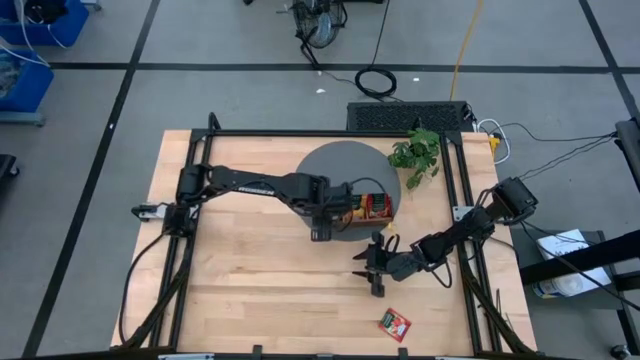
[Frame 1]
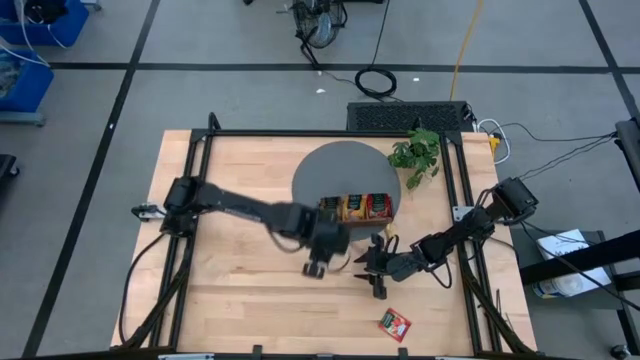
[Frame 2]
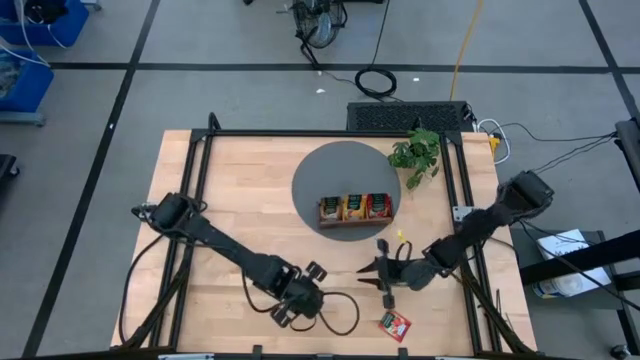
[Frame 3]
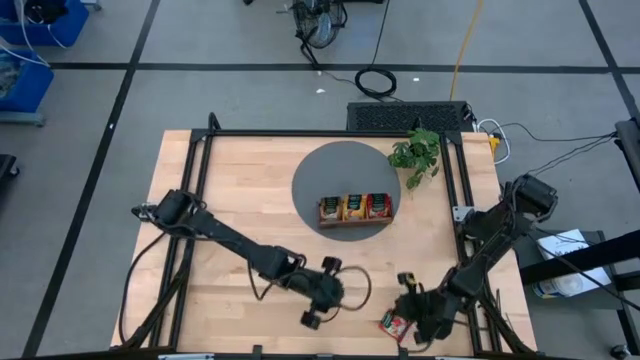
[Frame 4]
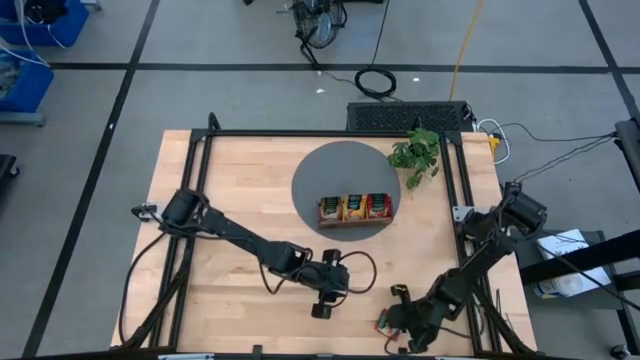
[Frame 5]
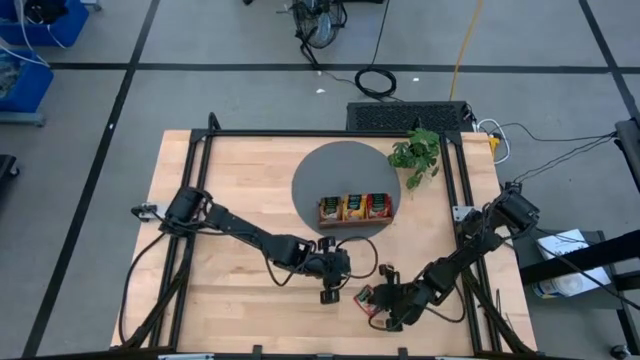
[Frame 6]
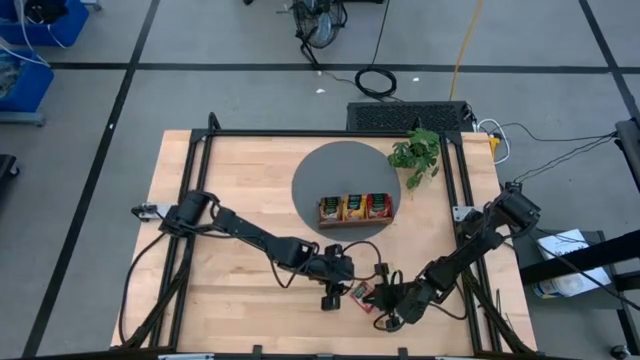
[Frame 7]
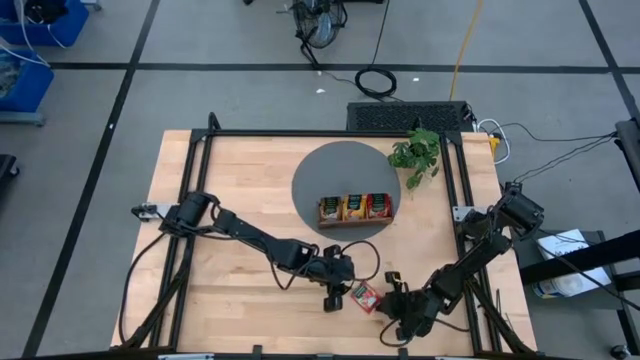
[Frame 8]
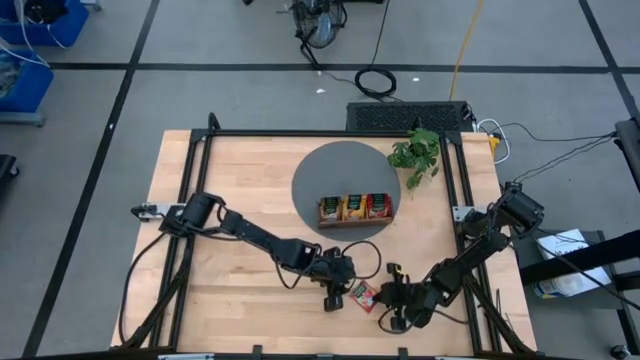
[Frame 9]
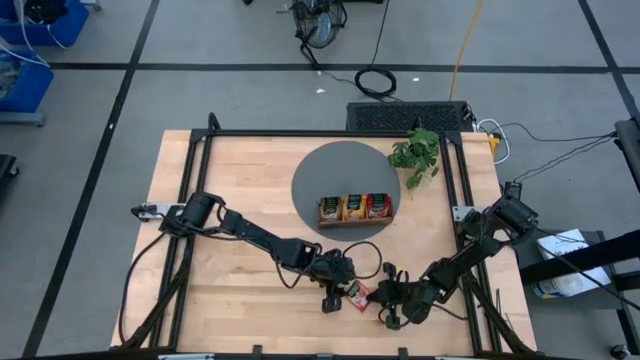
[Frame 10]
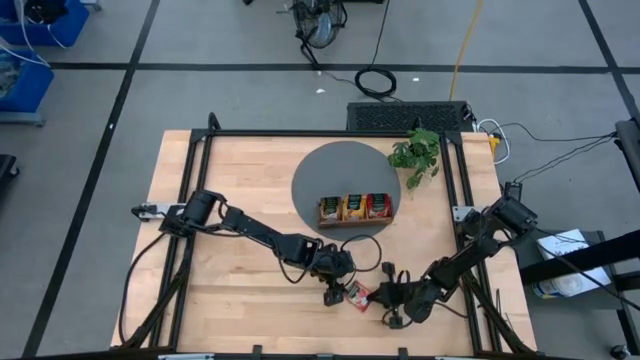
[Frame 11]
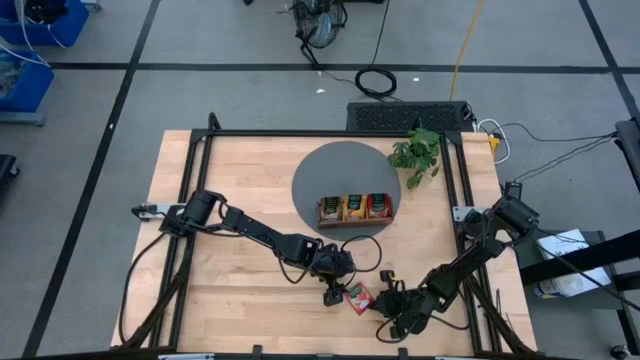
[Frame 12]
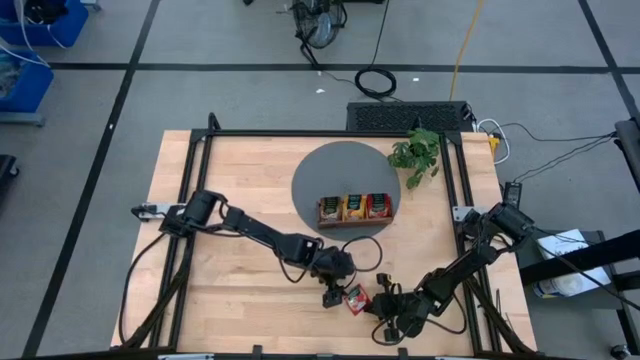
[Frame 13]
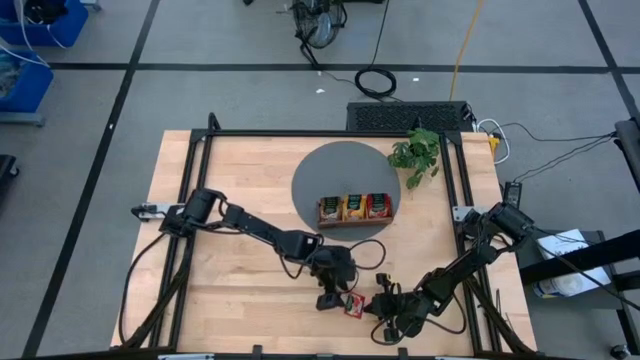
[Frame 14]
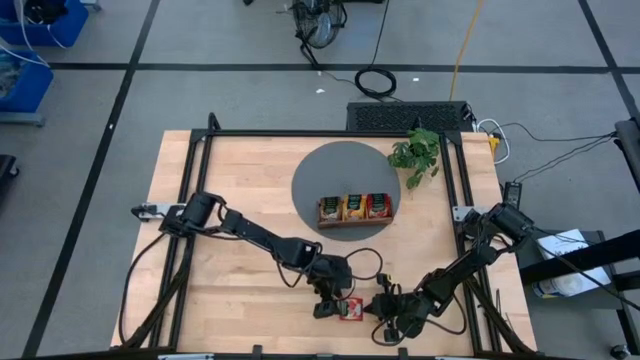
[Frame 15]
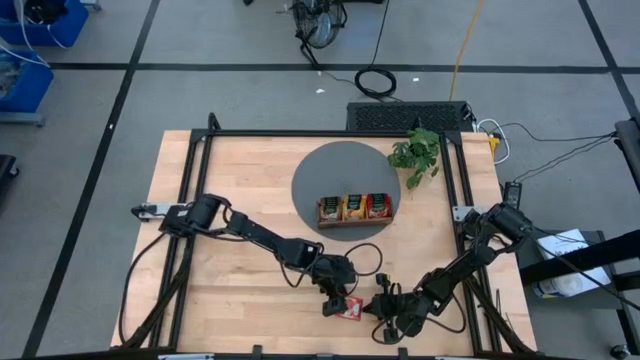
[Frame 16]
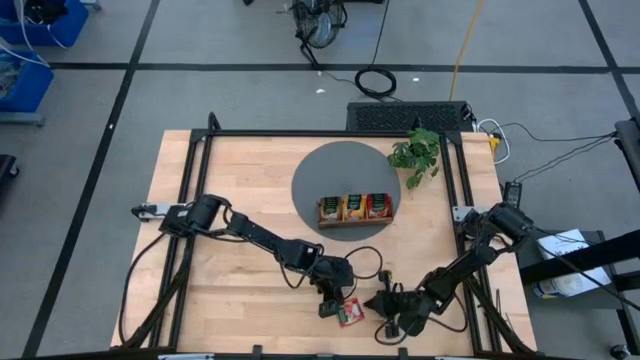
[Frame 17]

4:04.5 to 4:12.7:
Task: Pick & Place Tea
Put the red tea bag into the right section of the wooden organizer

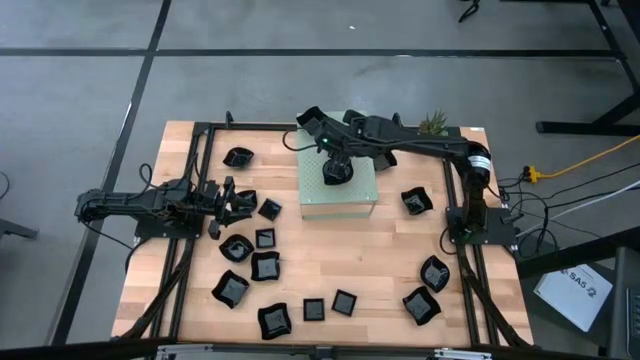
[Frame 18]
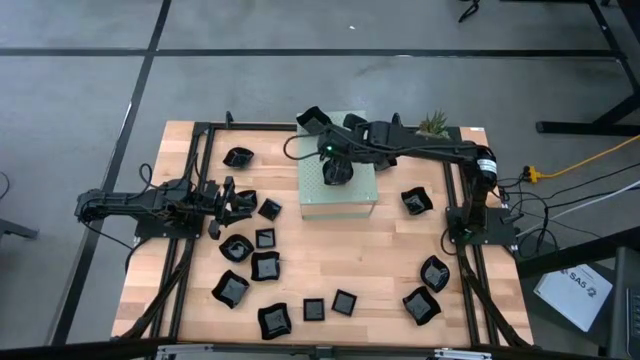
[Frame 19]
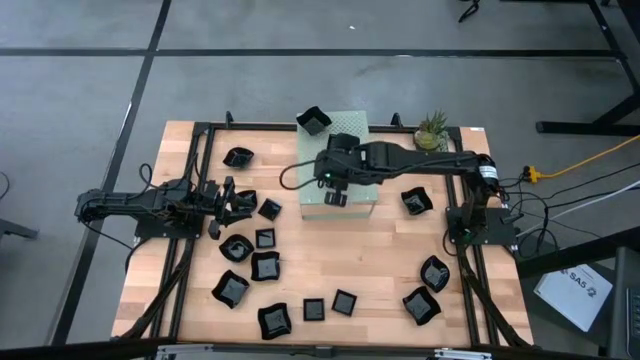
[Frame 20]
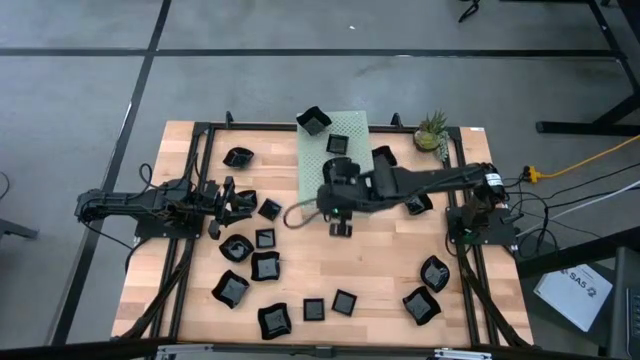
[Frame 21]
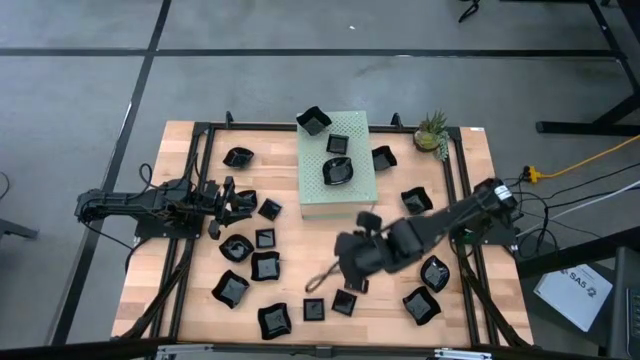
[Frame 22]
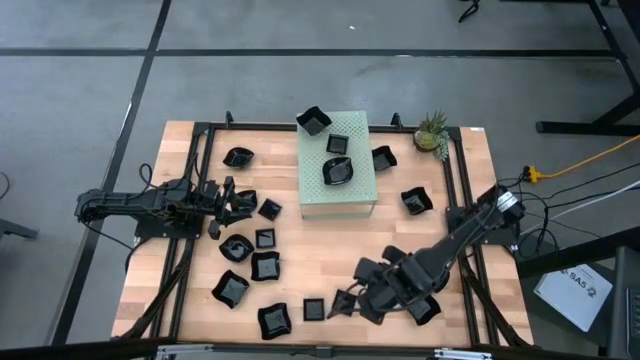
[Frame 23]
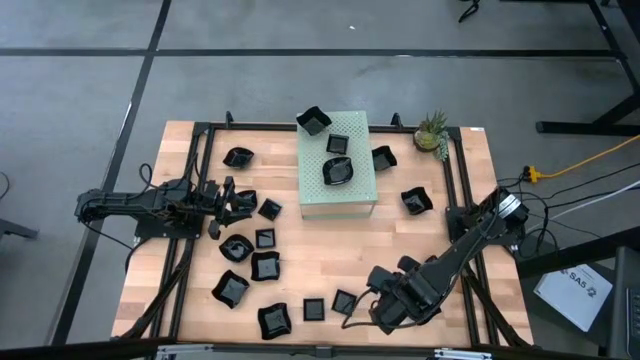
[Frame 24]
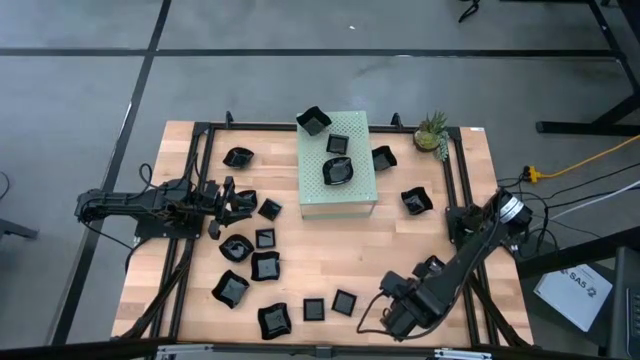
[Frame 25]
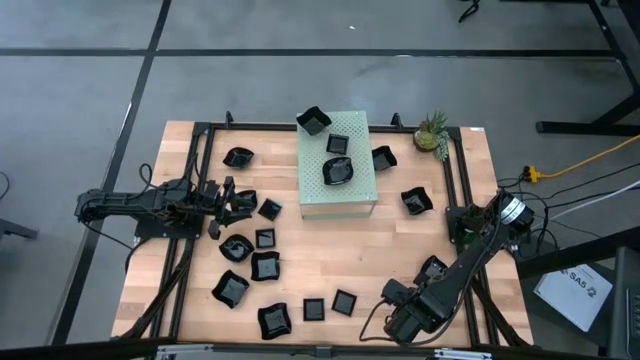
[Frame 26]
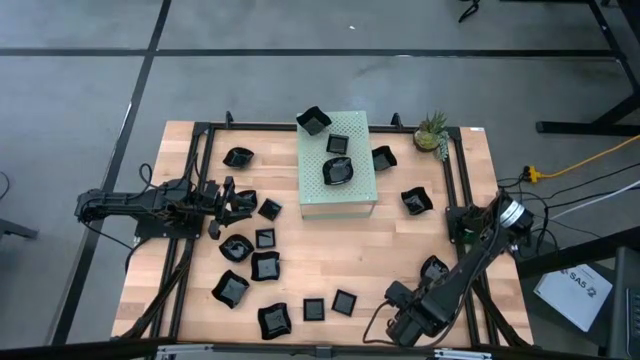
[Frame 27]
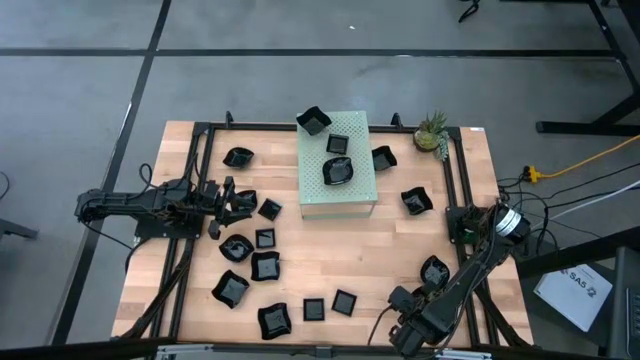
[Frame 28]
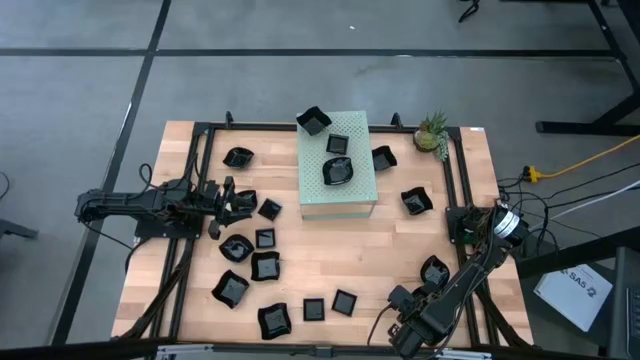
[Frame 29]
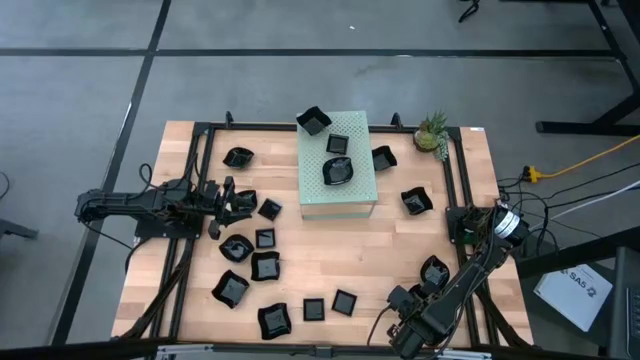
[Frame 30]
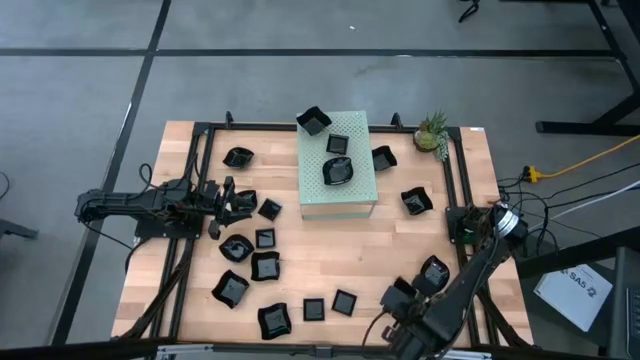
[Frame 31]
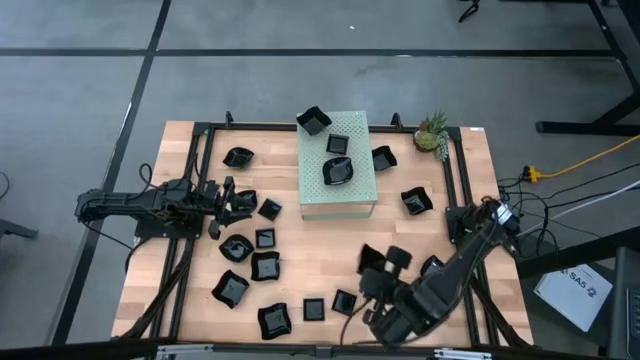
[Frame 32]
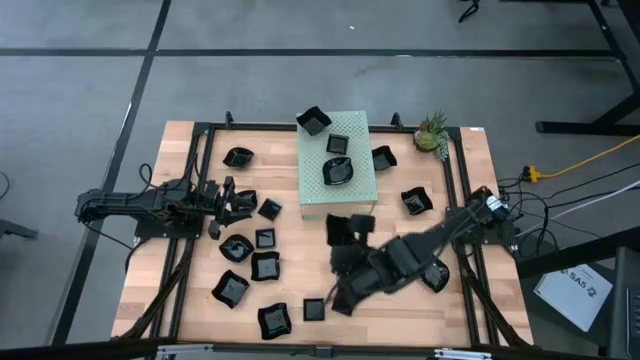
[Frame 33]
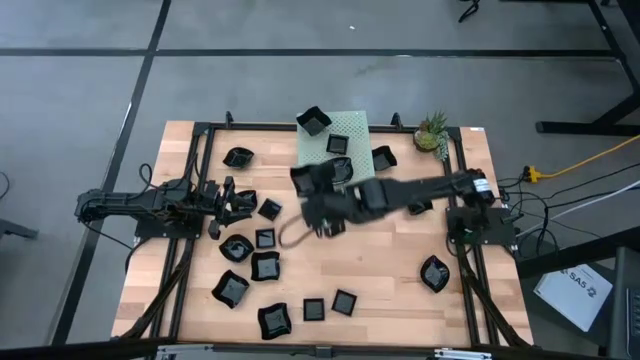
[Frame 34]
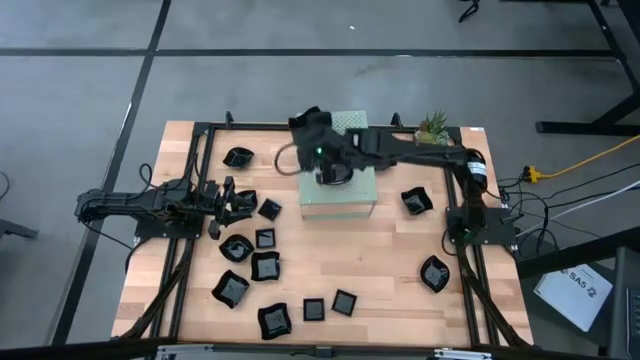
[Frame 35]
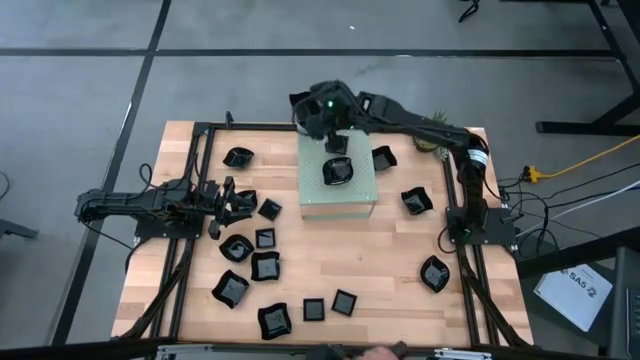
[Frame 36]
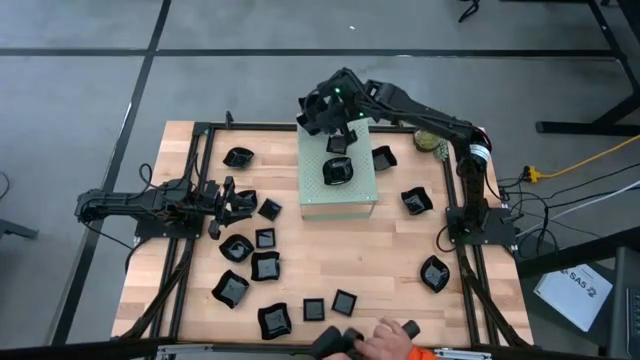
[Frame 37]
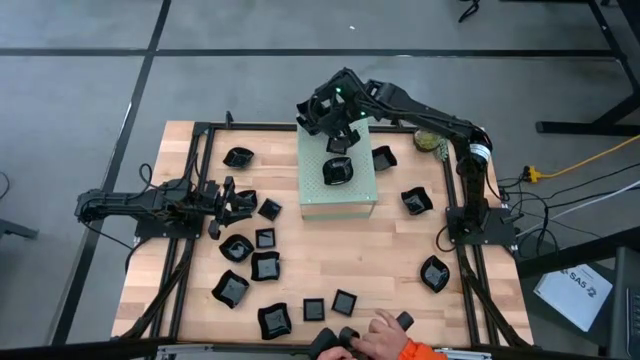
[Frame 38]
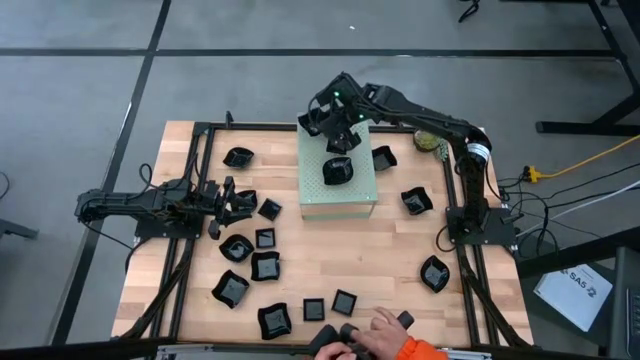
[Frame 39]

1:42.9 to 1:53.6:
Task: Pick & Place Mini shaped plates
Stack the black distorted square plate on top of the black distorted square plate on the shelf
